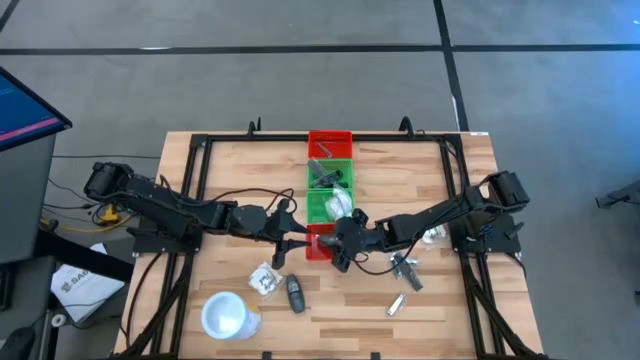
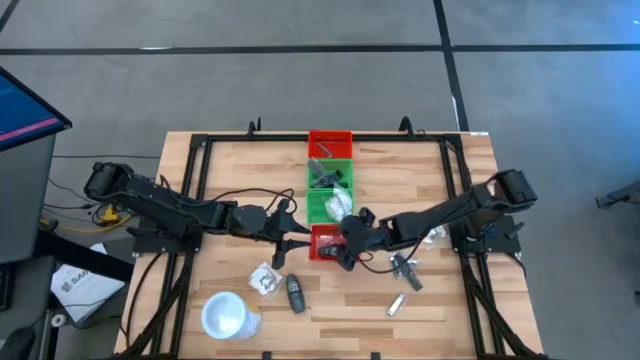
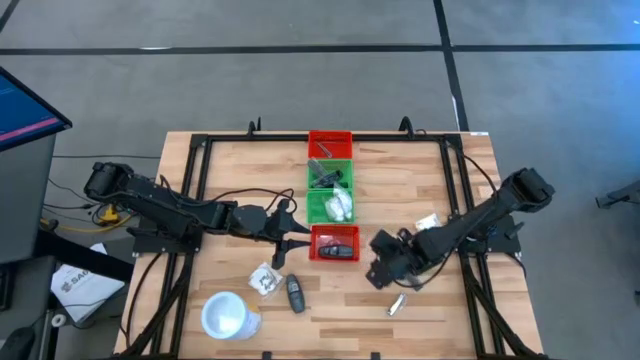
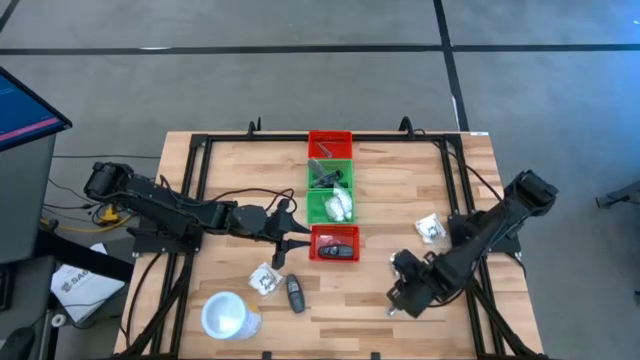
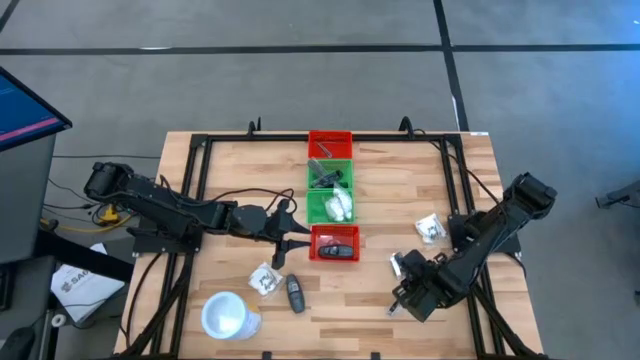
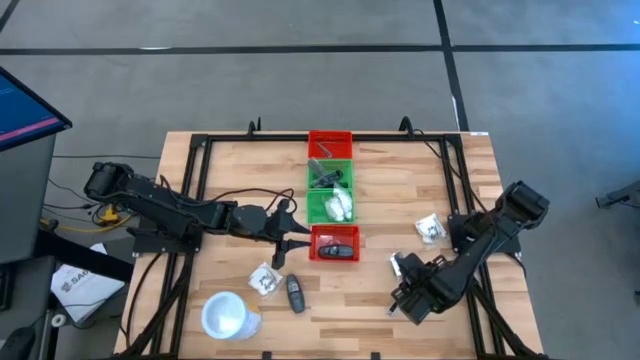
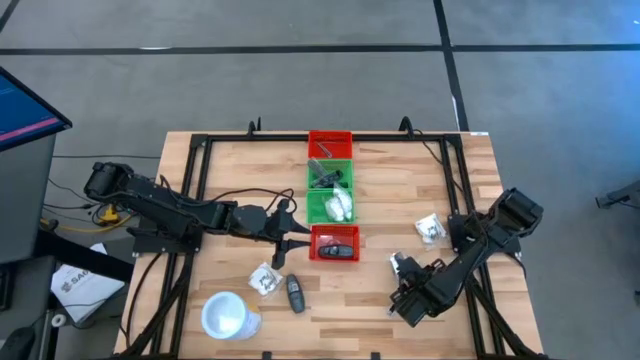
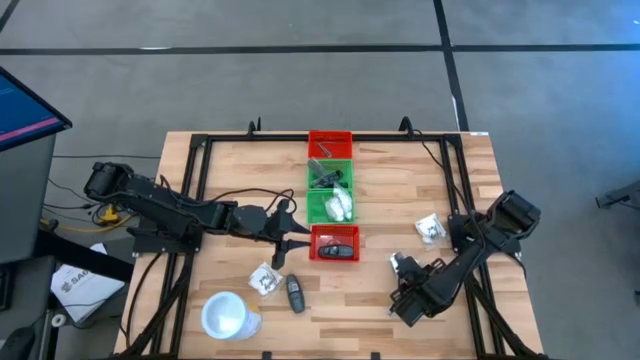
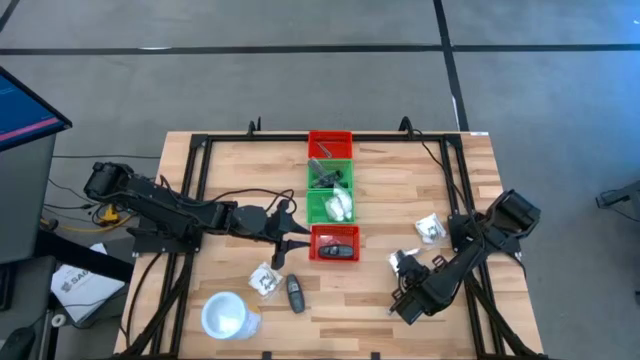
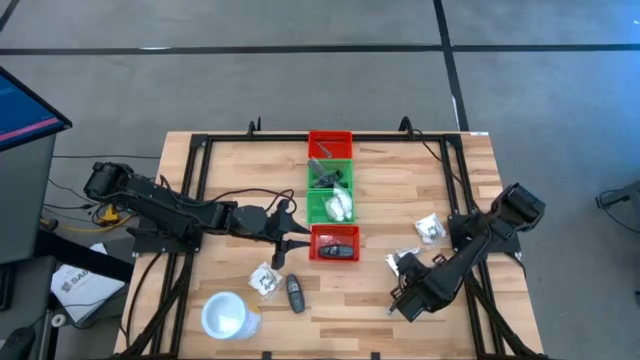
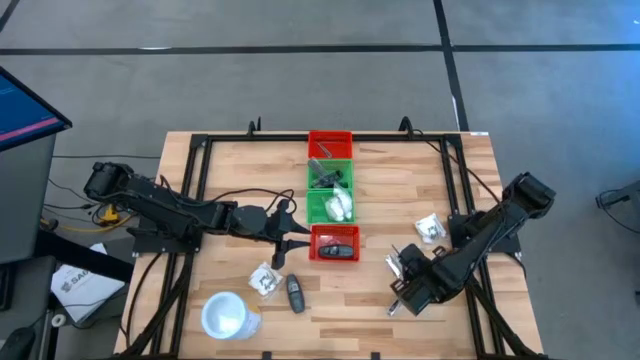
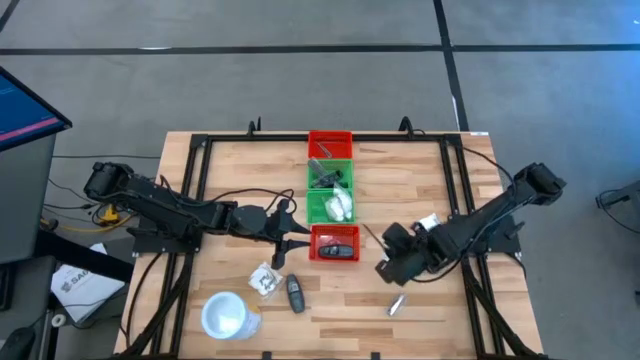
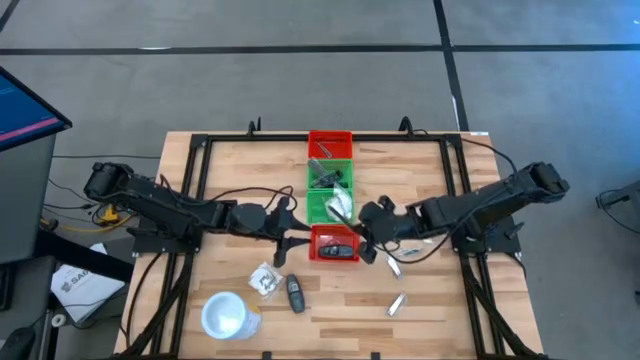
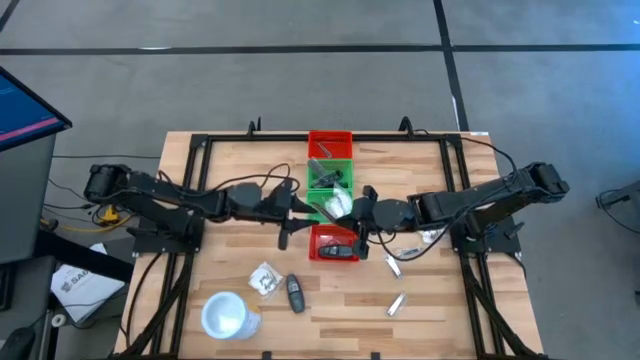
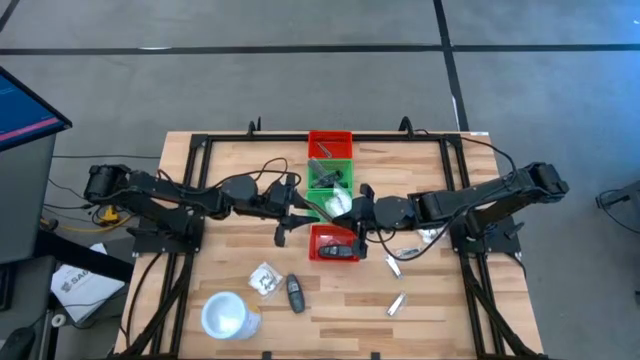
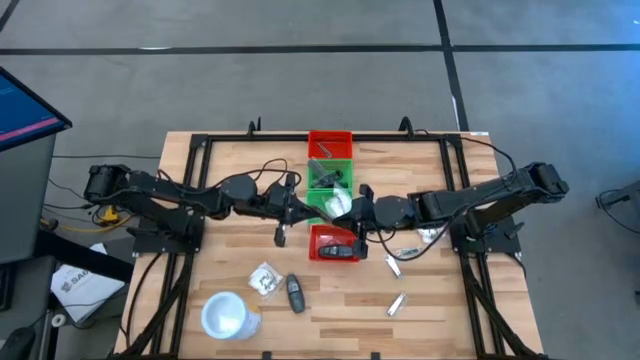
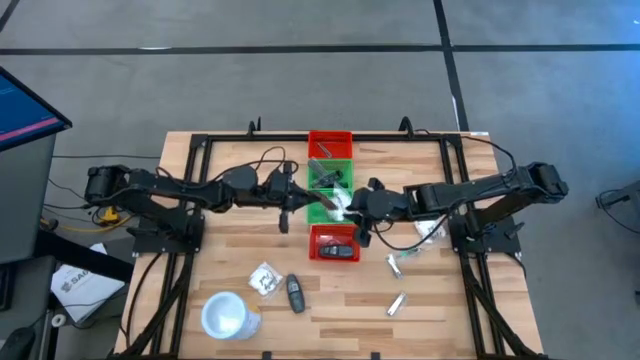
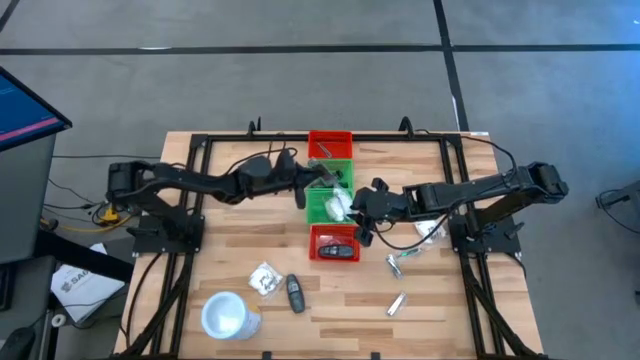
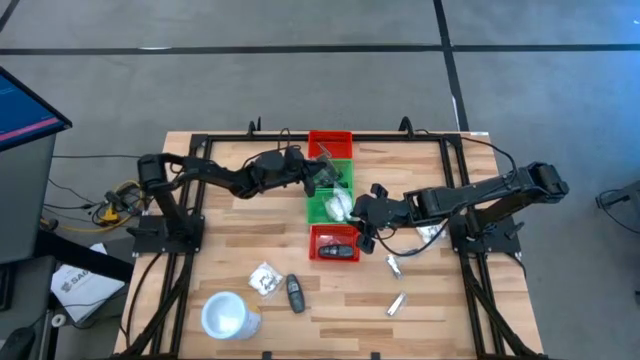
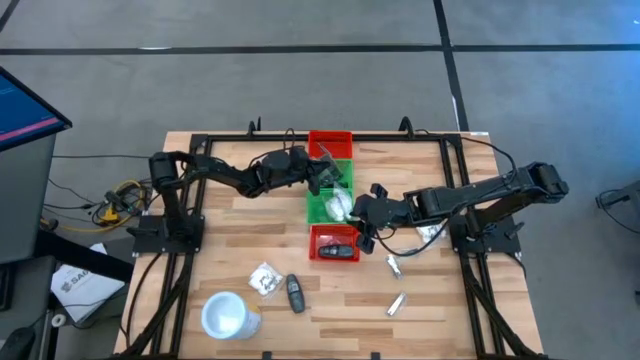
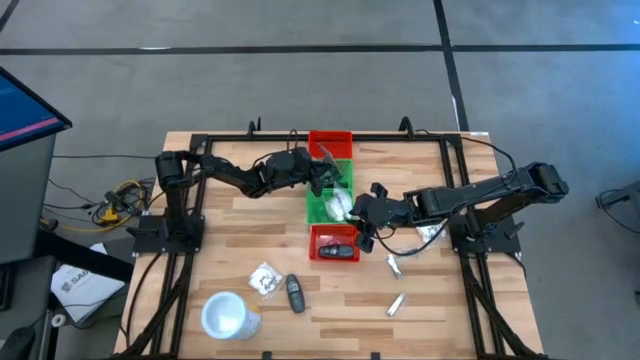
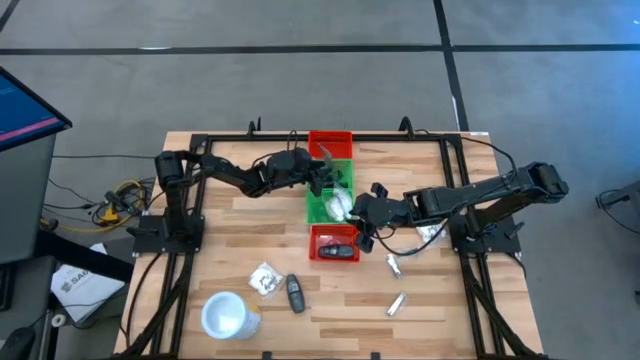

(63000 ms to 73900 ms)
Task: Pick & Place Travel size toiletries
Put the black comb into the top green bin

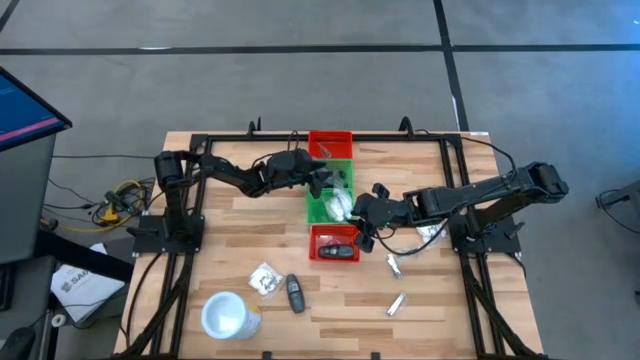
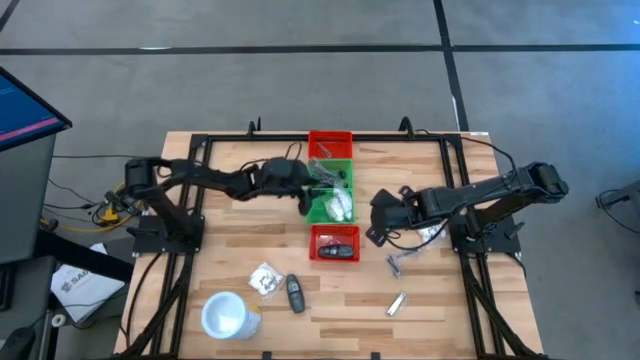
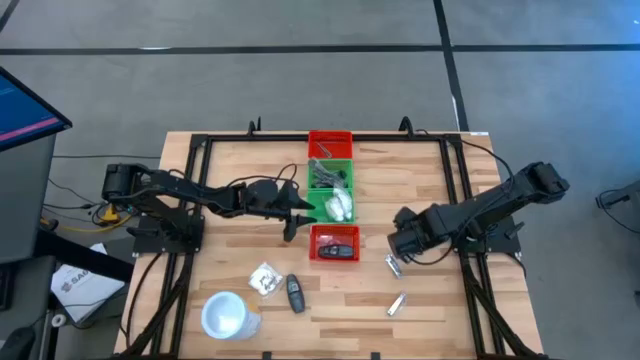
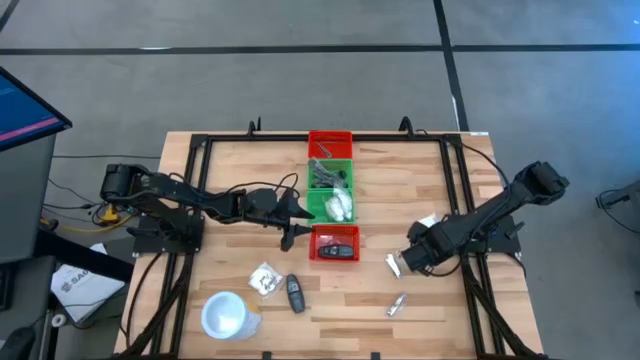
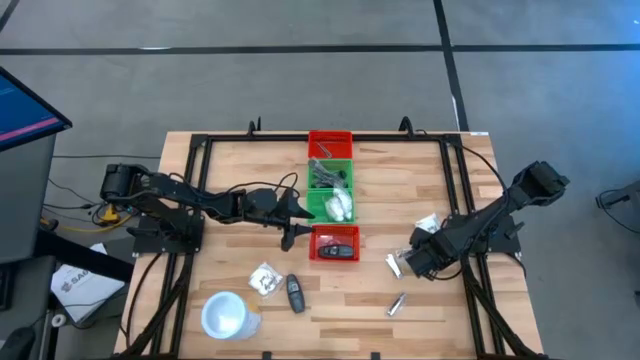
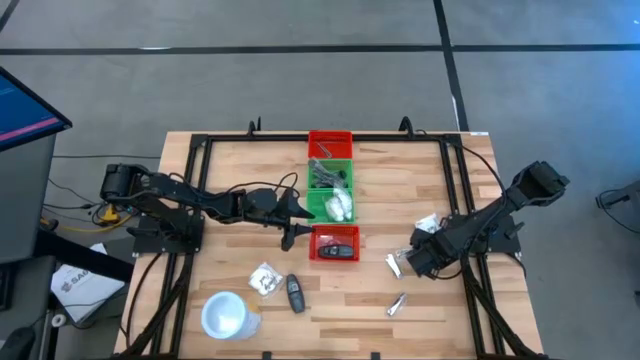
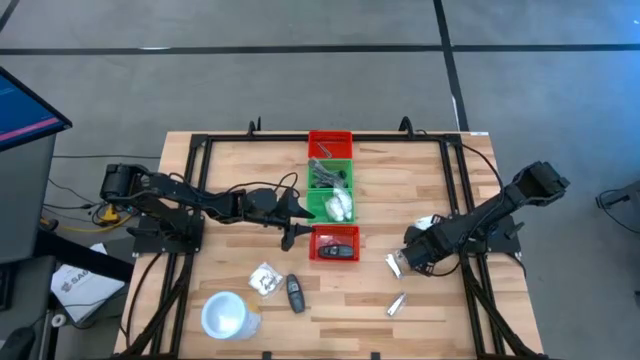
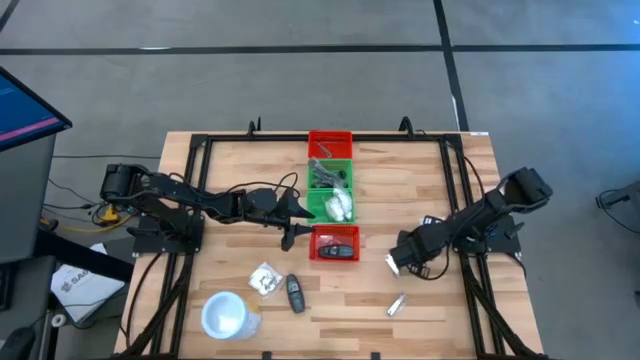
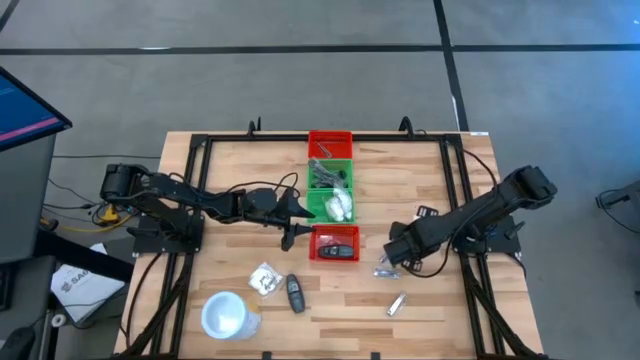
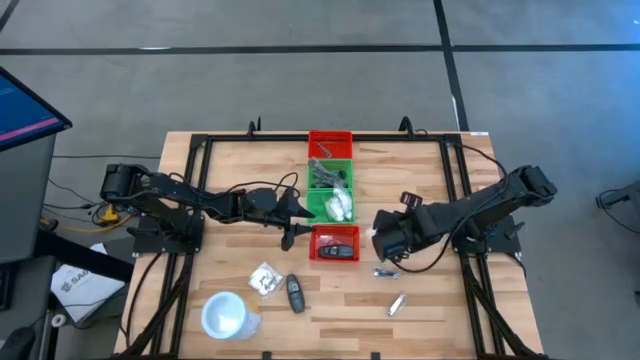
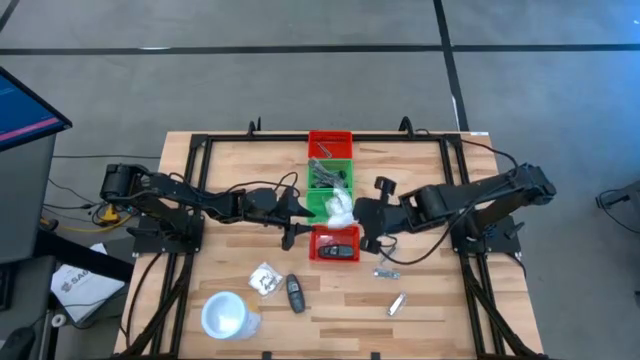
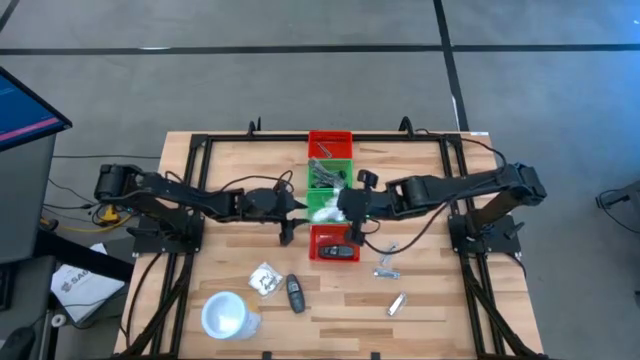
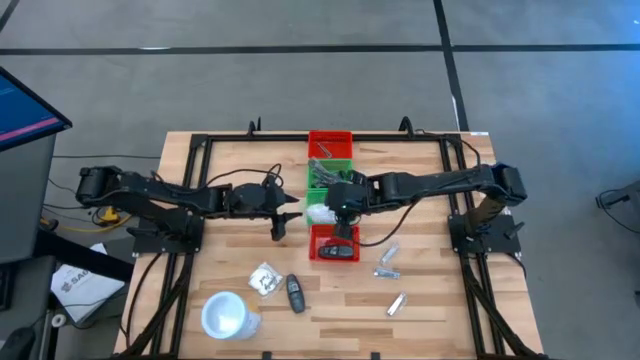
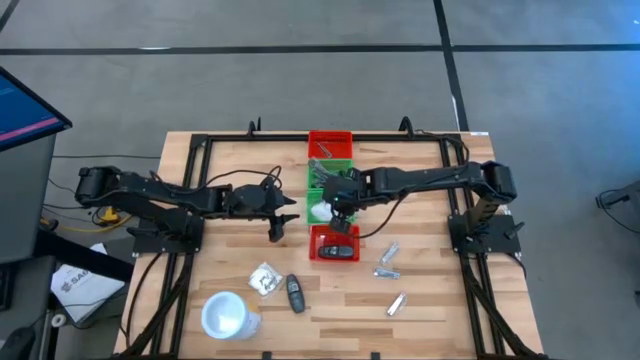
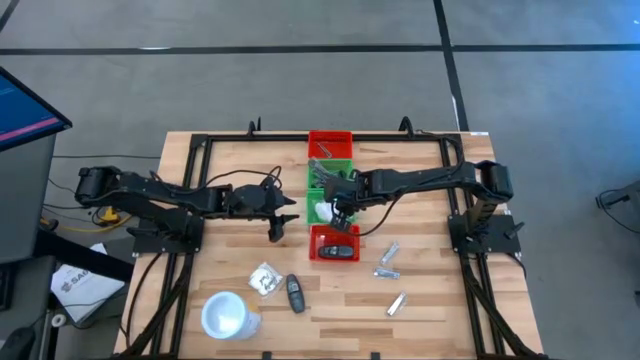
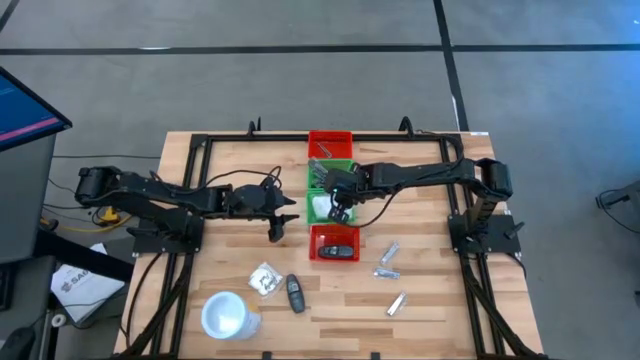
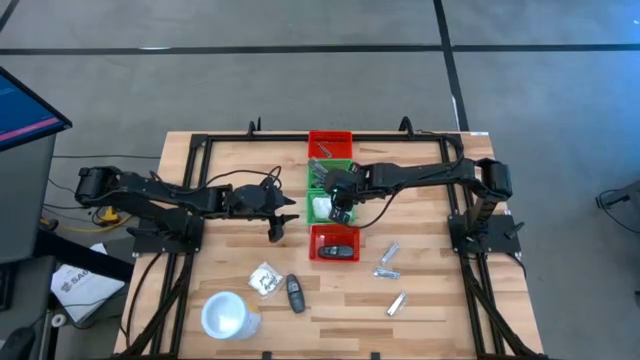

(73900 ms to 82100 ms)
Put the white cotton pack into the bottom green bin

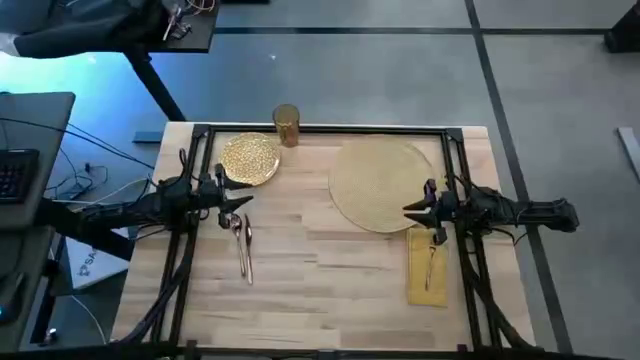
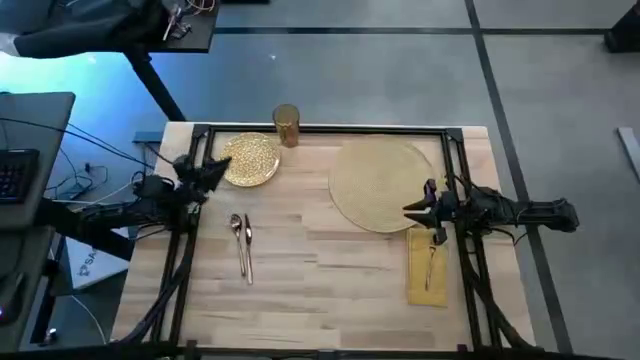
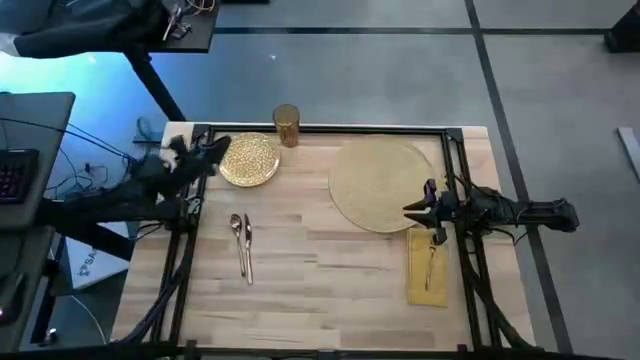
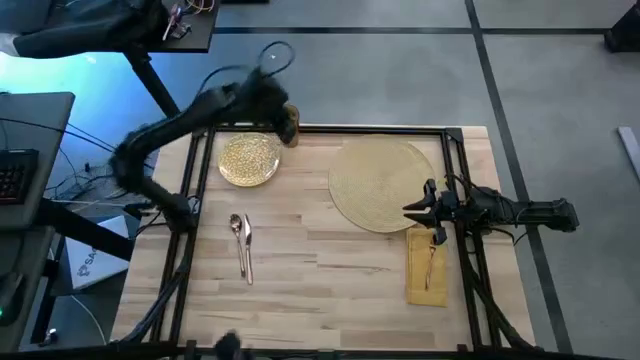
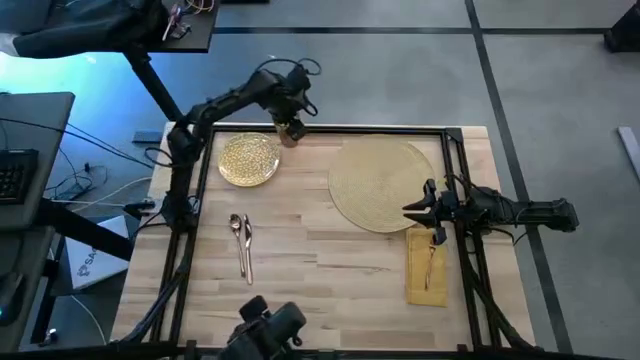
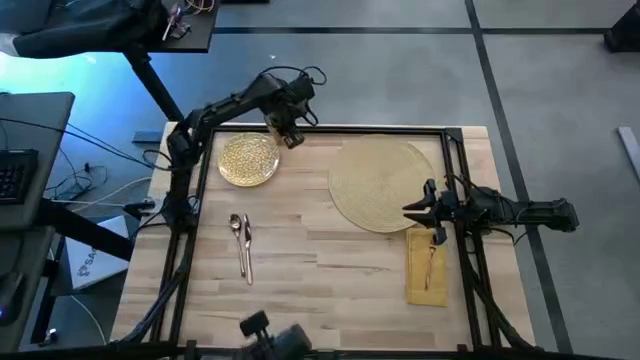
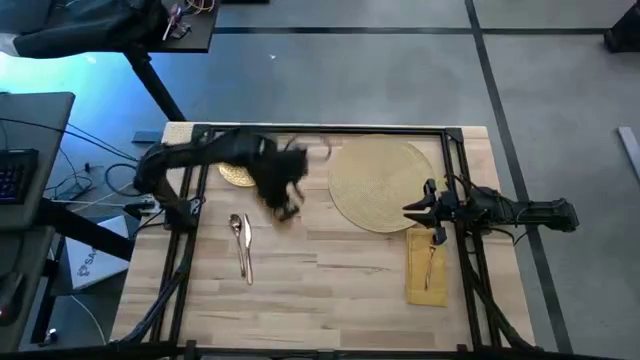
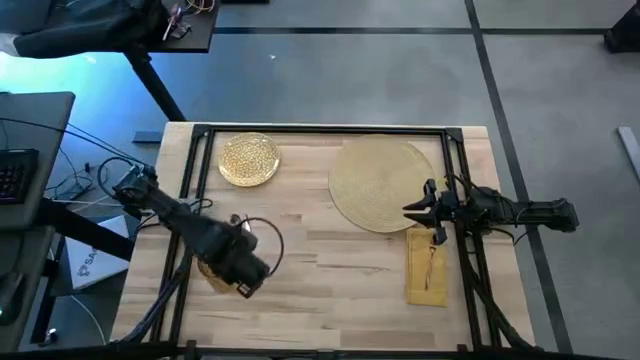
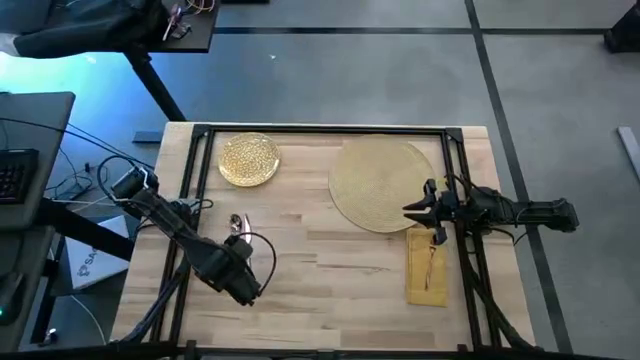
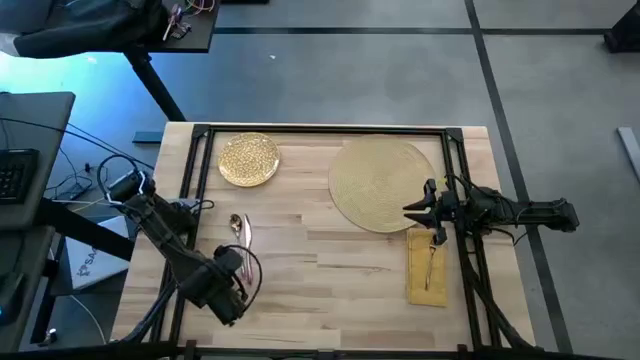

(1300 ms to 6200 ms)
Task: Set table place
Move the yellow cup to the bottom left of the table
